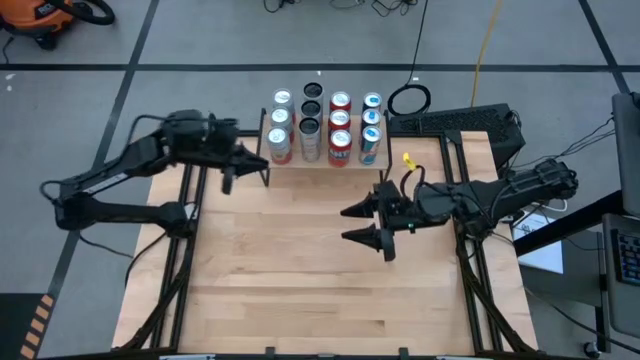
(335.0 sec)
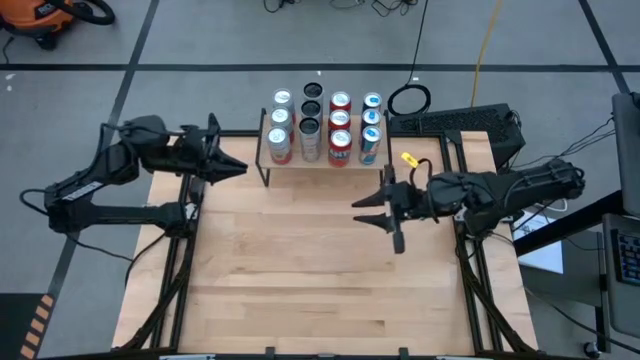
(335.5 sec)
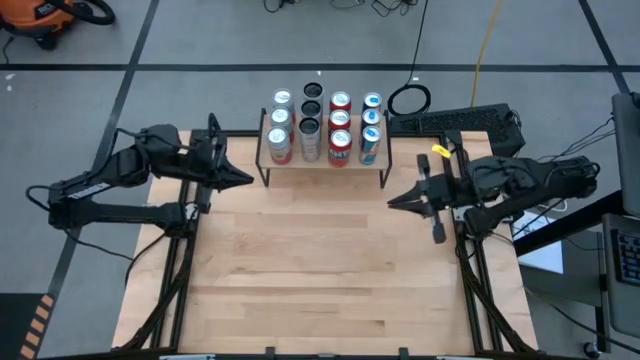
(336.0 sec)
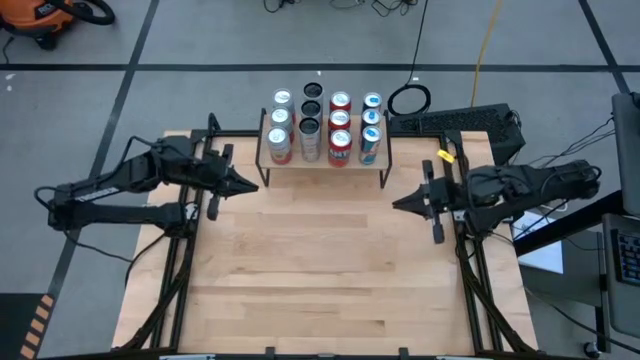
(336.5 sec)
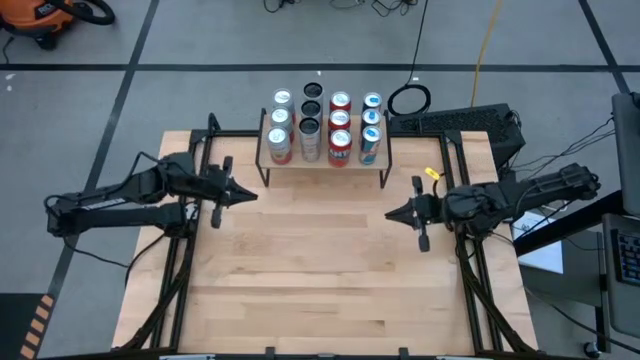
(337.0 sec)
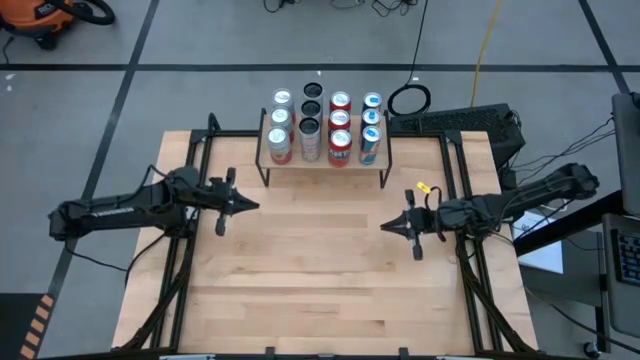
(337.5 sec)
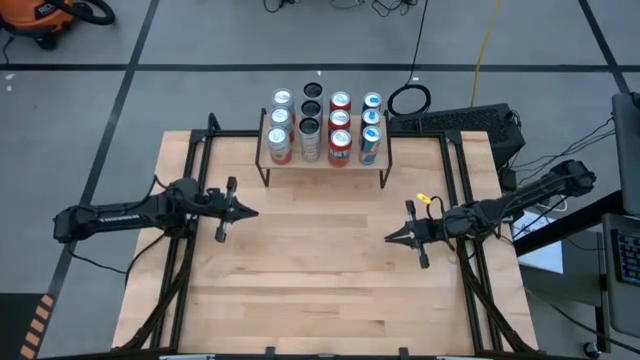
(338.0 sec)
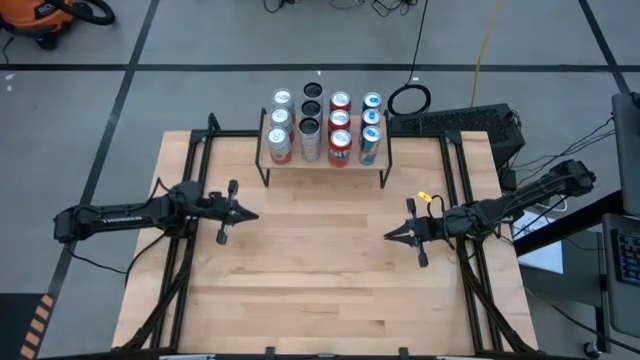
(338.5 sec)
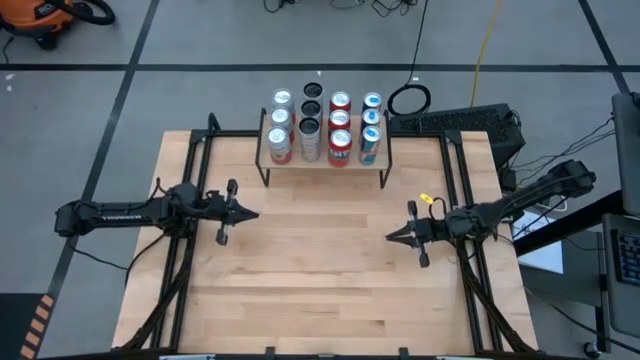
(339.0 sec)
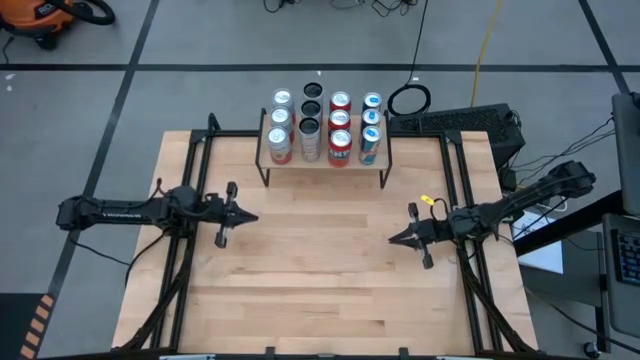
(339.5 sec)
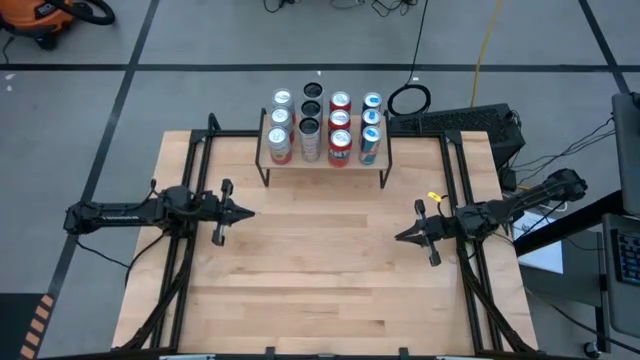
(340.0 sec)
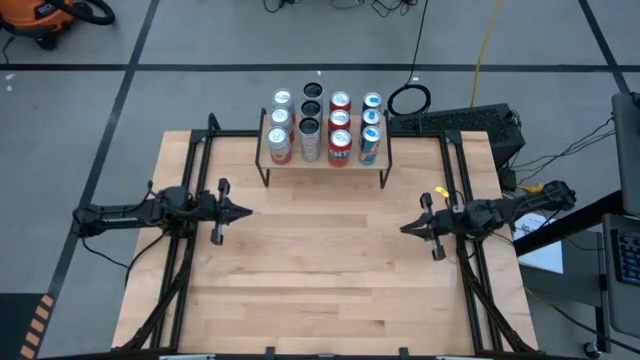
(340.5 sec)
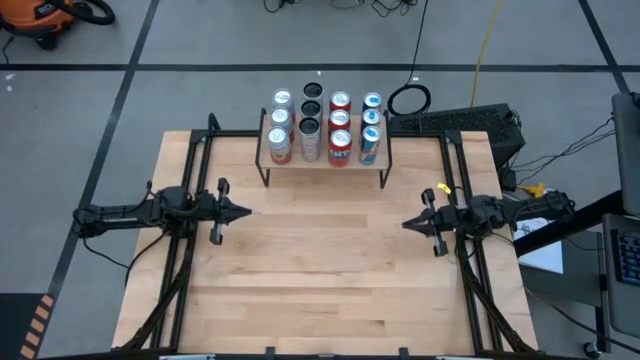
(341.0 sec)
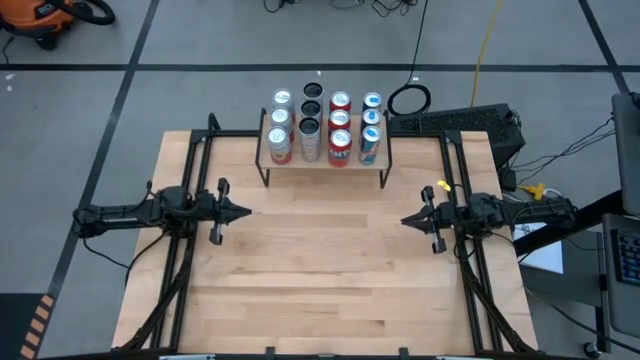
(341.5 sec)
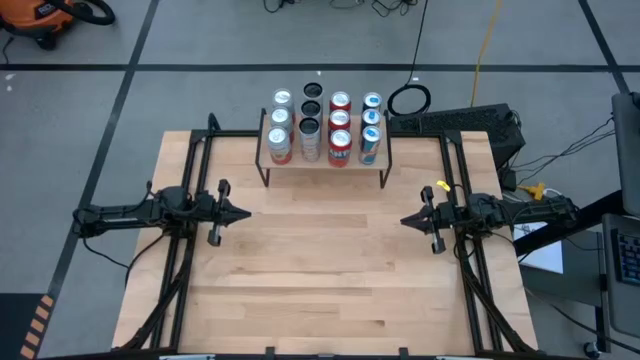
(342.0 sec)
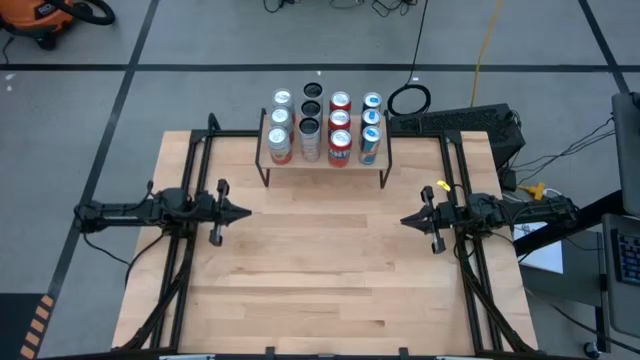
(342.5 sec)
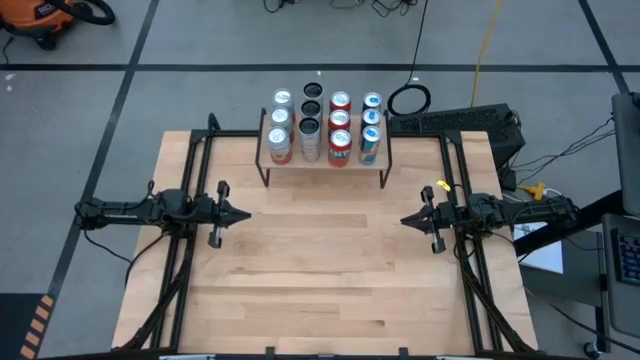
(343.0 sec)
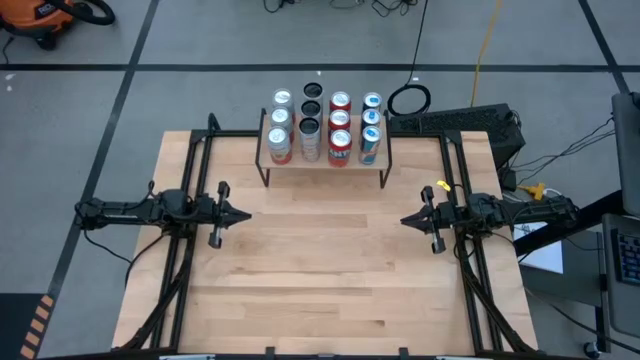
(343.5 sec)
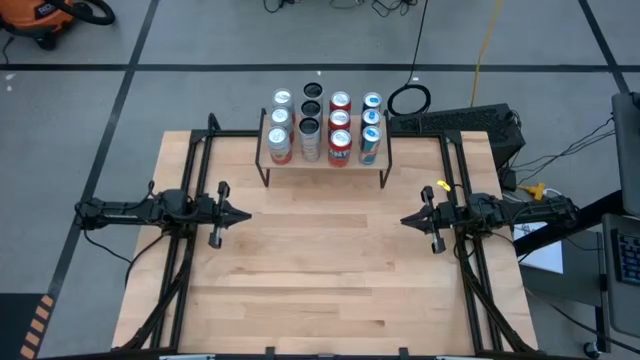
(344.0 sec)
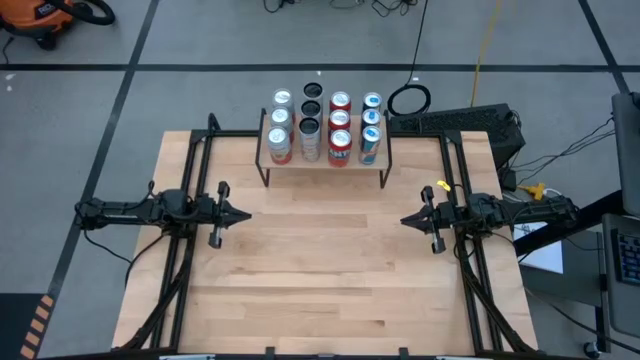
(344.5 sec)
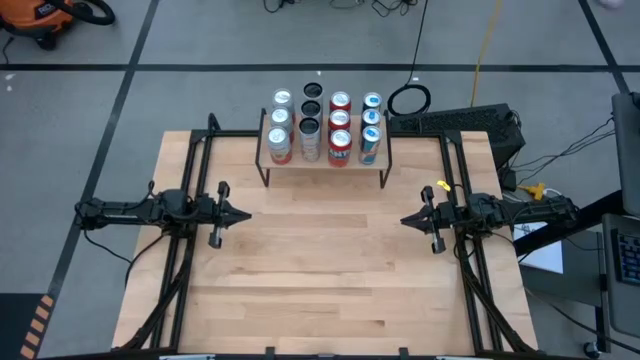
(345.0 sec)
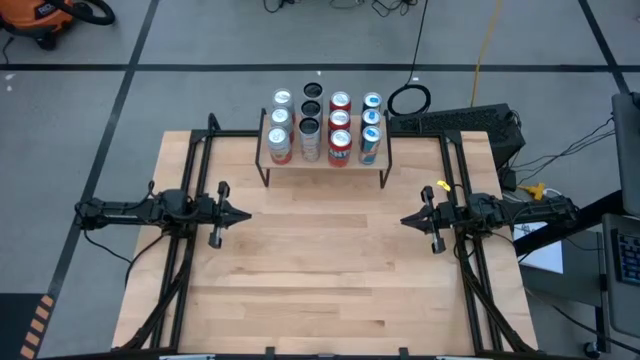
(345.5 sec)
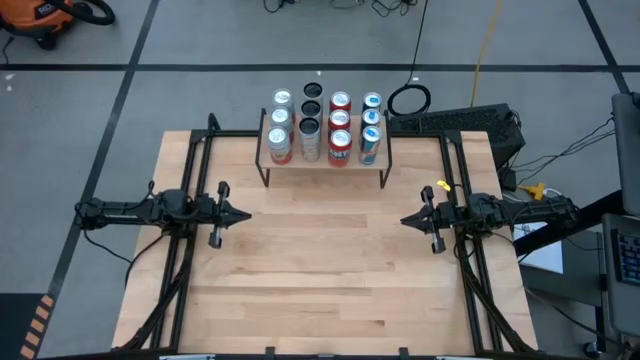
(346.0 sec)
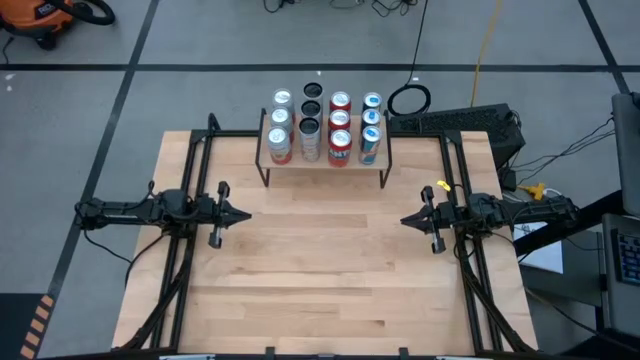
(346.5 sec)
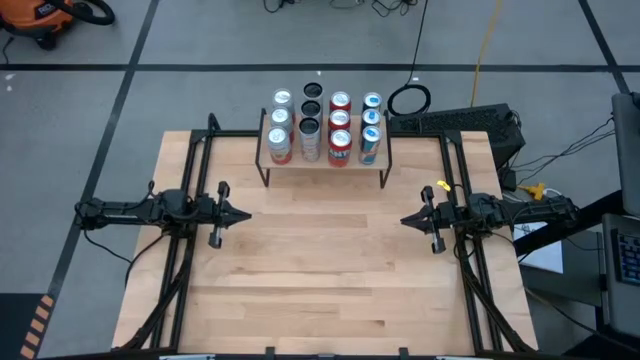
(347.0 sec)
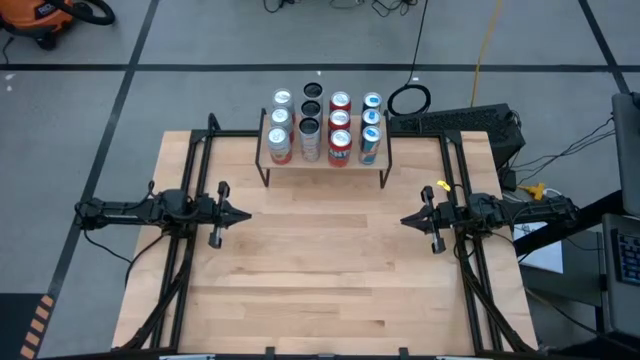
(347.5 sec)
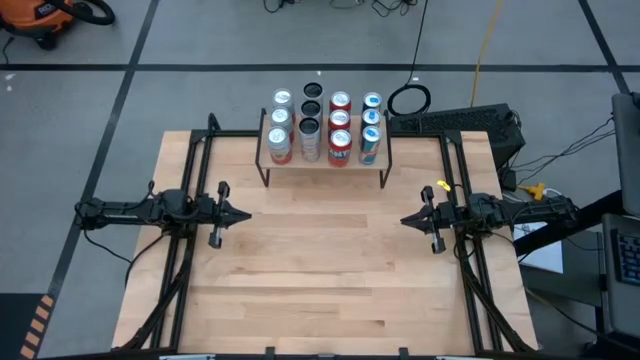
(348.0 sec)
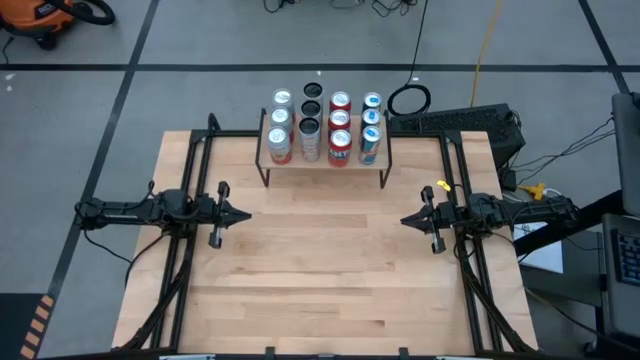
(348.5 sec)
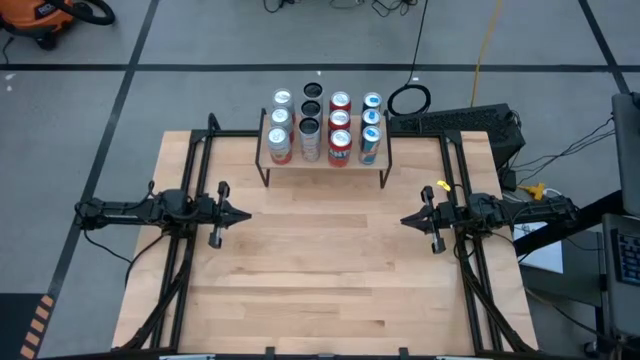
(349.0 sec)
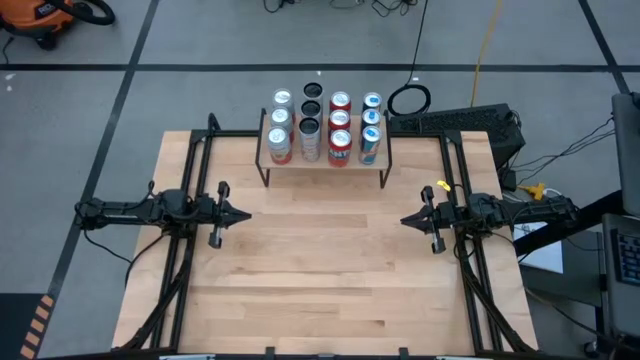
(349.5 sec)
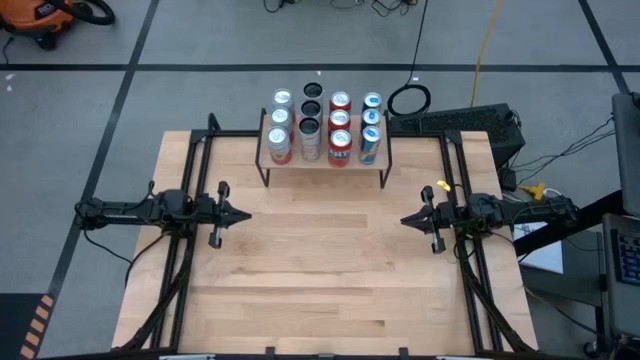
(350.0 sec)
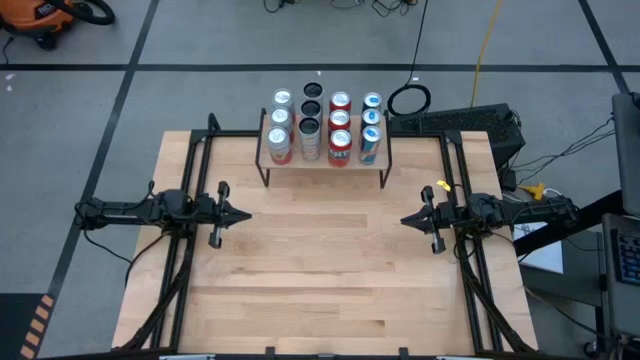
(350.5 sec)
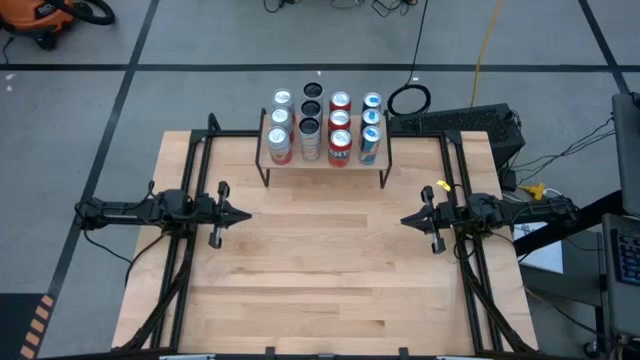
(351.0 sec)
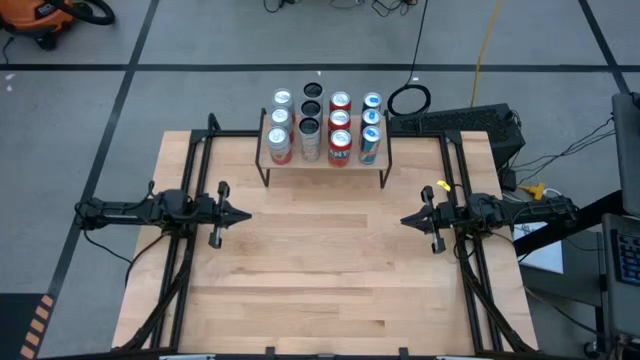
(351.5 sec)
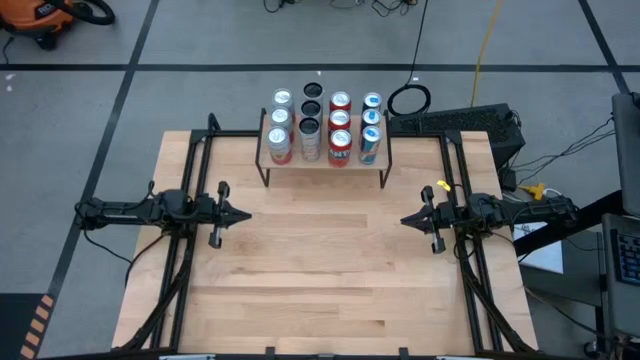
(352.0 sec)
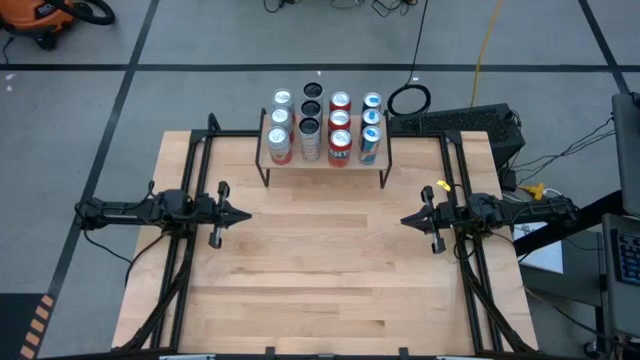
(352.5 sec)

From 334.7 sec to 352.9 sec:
Task: Place canned beverage on shelf
Return to Home Position
